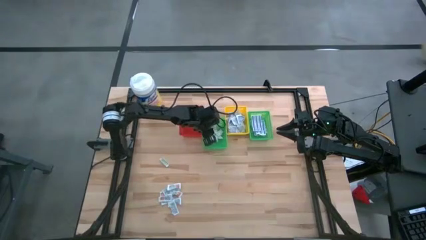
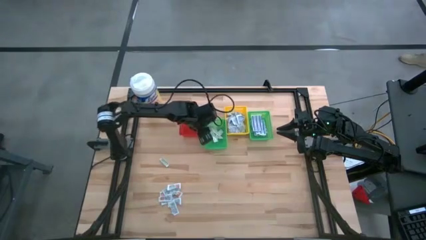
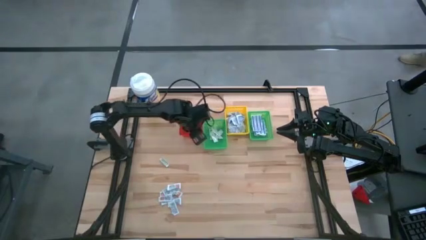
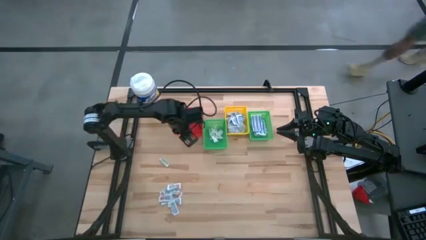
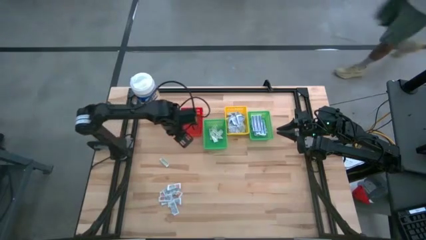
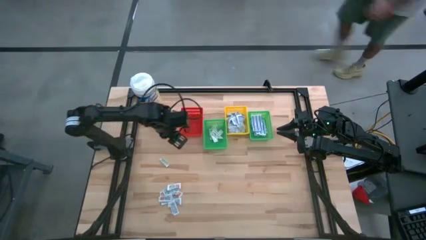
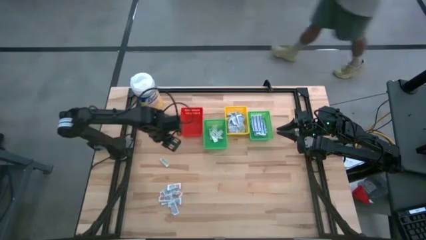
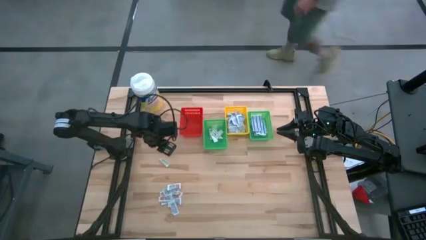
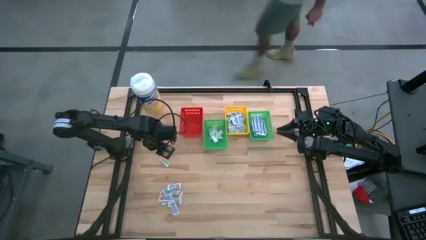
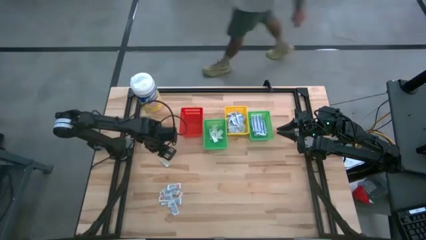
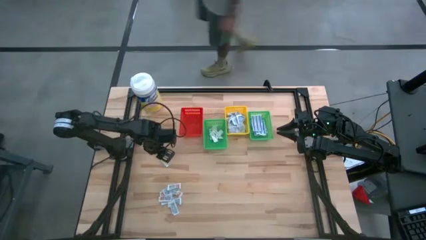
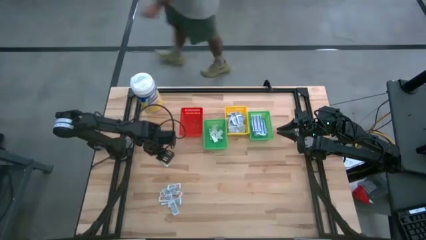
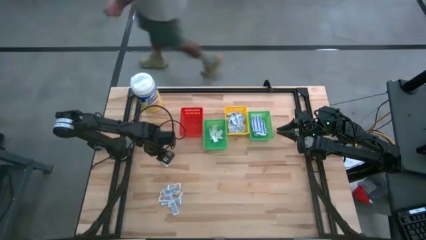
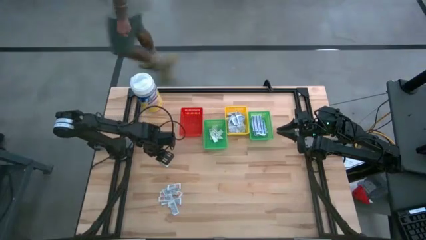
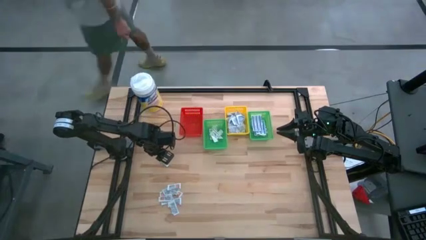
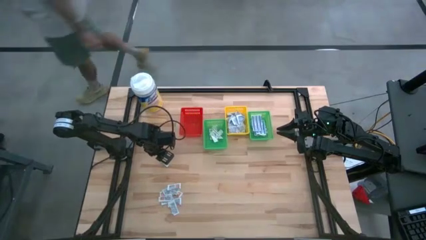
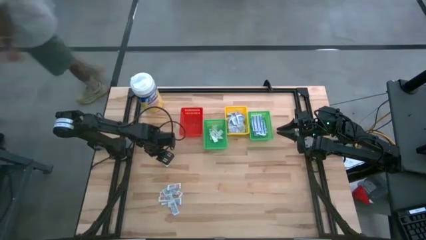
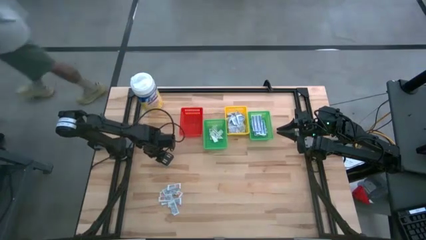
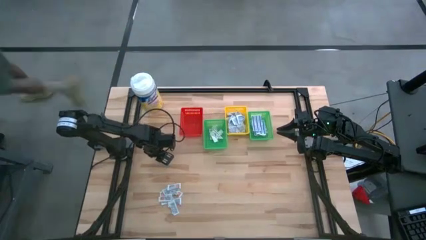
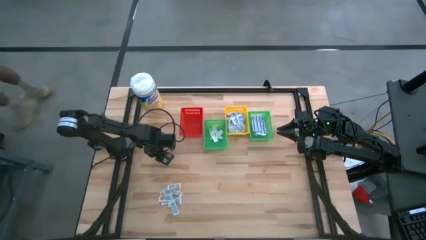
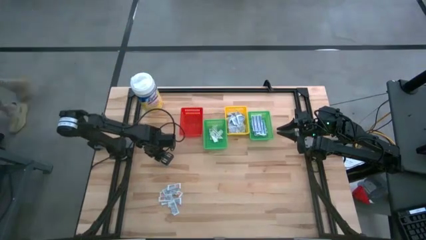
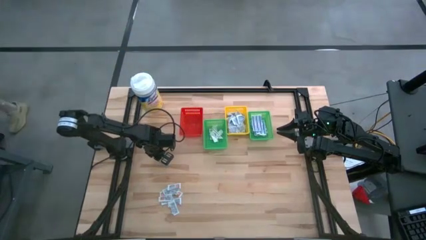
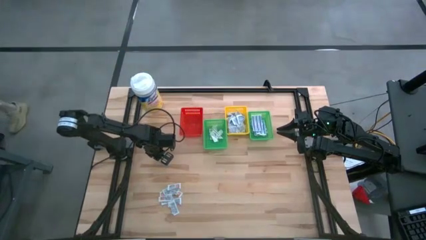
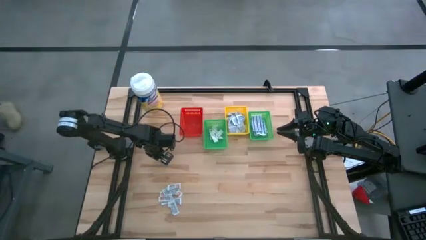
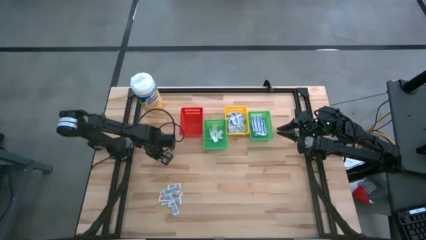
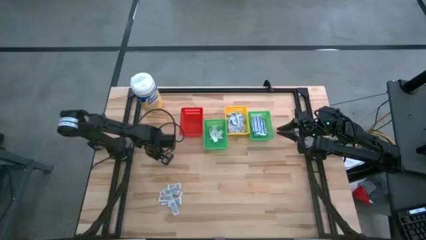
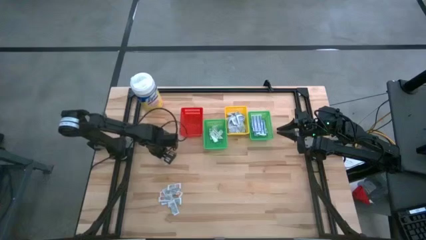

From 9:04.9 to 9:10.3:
Task: Pick & Place First Aid Supplies
Put the bandage into the left green basket

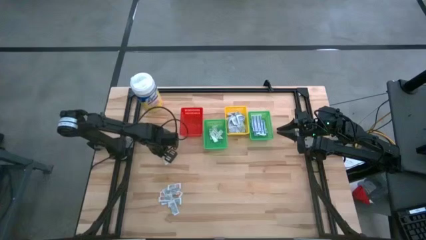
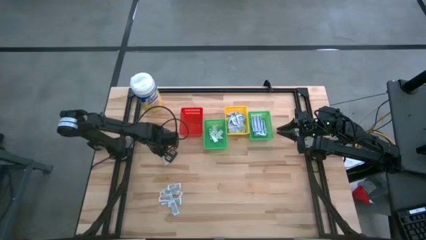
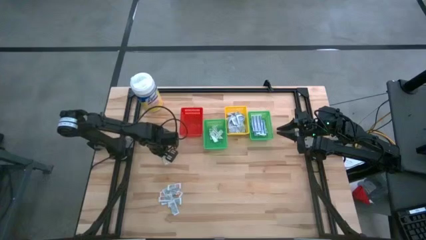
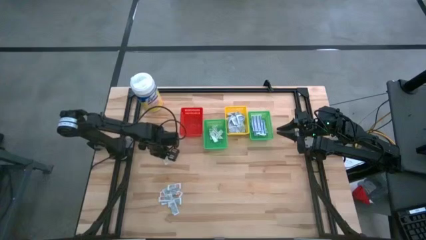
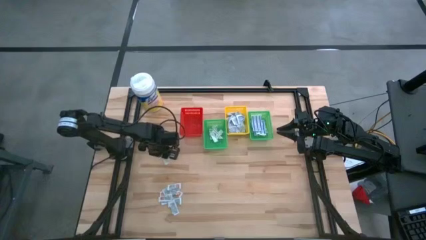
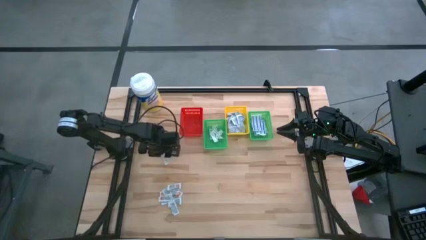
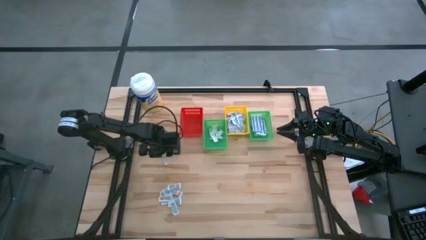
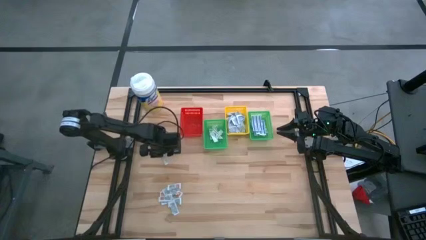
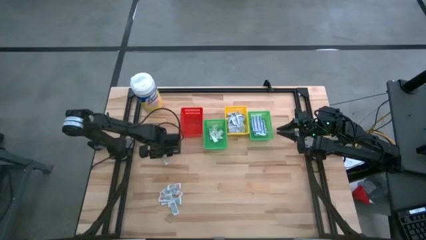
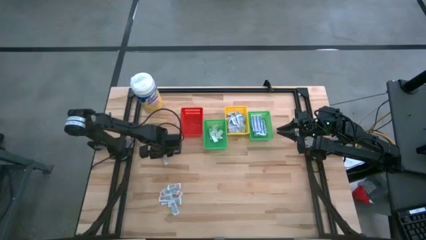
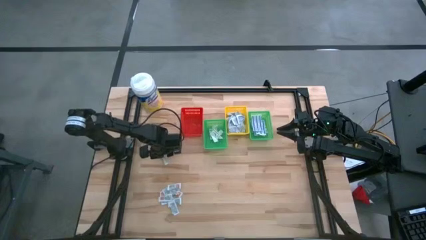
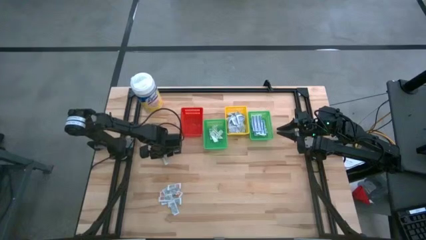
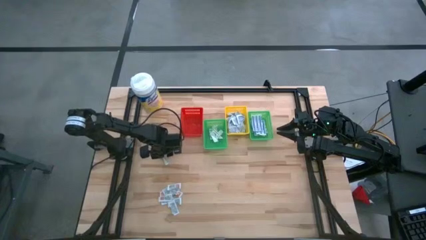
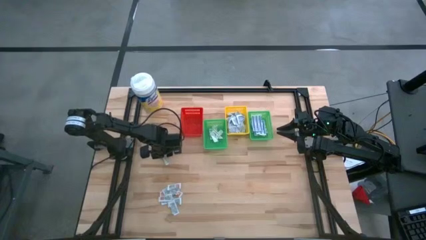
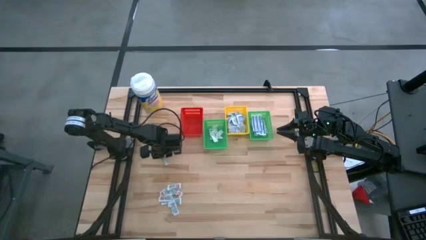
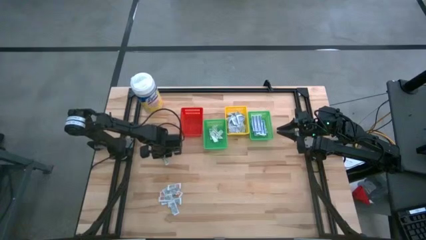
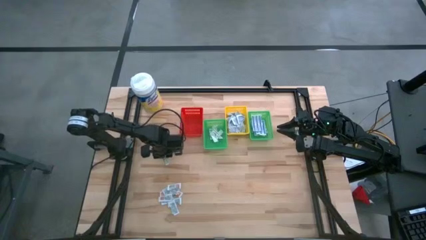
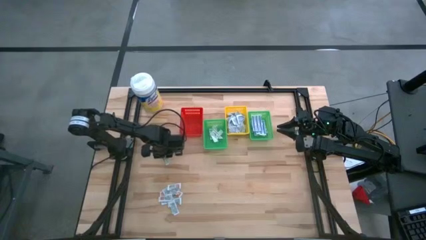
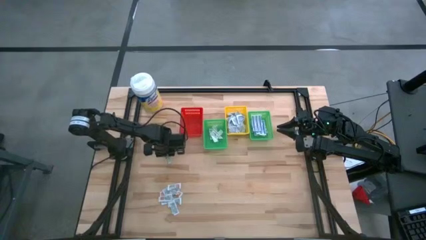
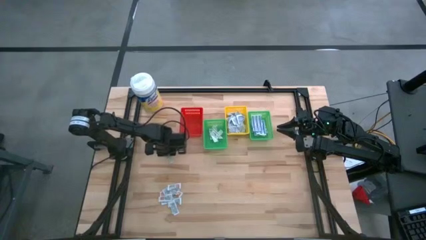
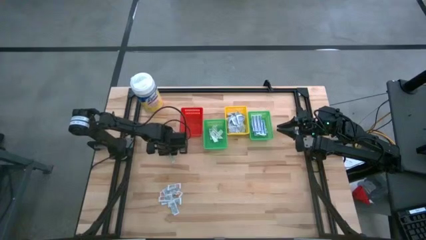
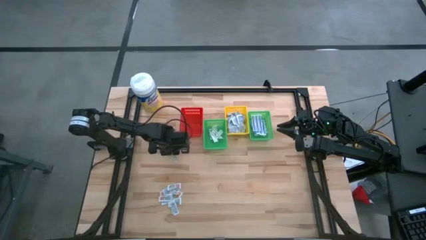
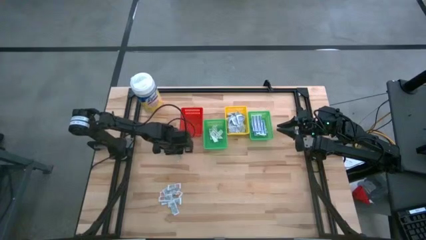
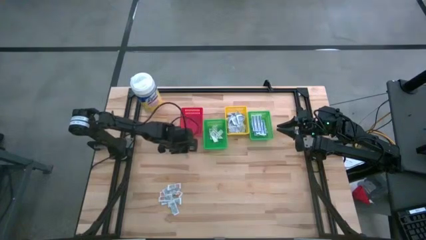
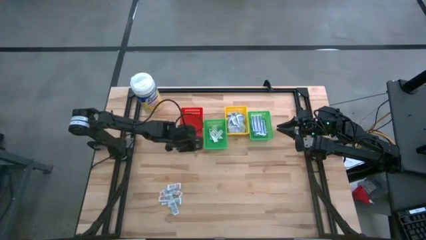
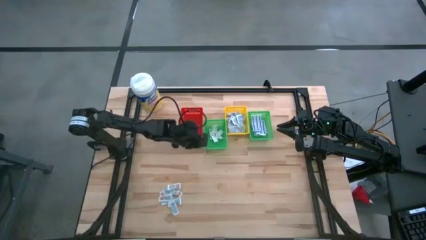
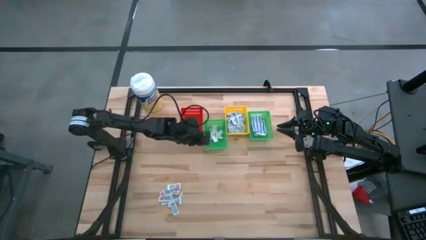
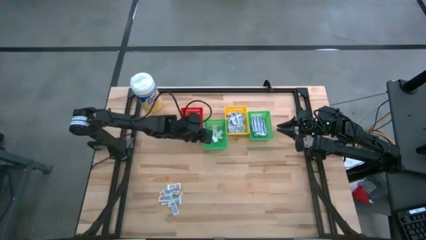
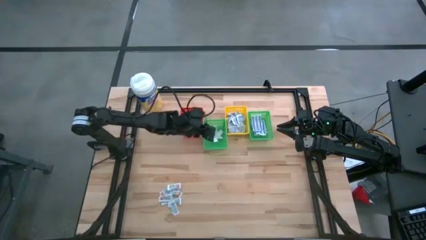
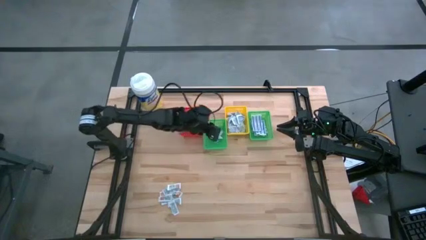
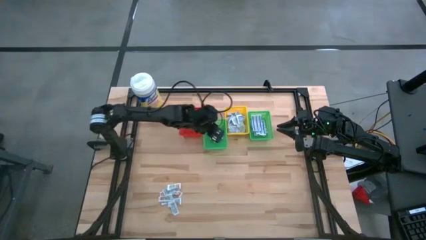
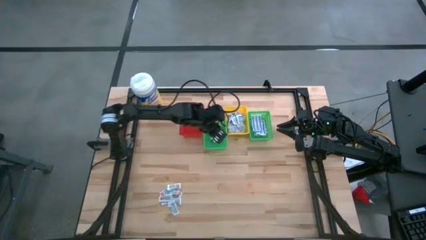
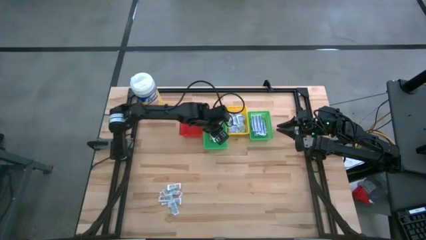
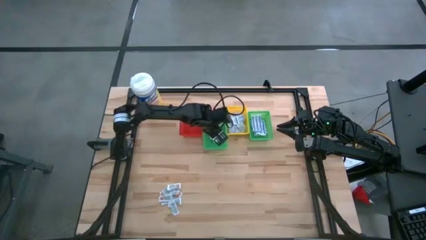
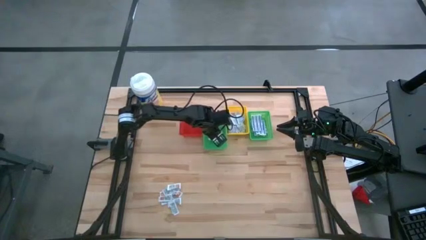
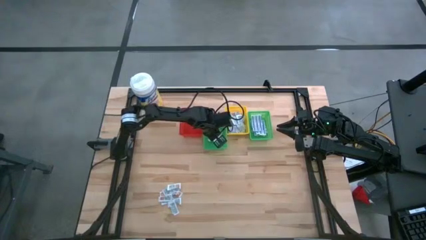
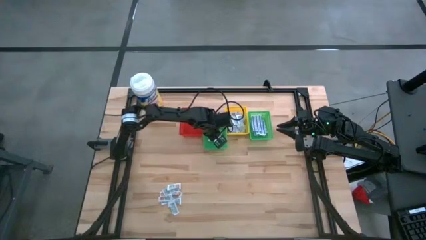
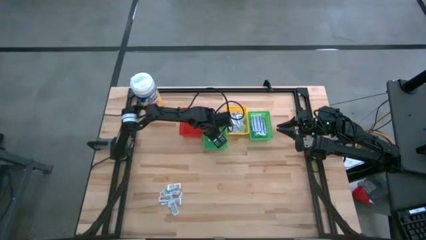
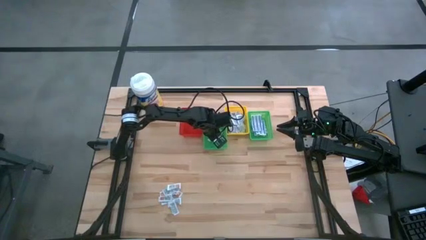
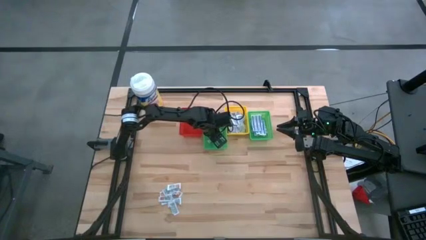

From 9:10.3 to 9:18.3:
Put the bandage into the left green basket

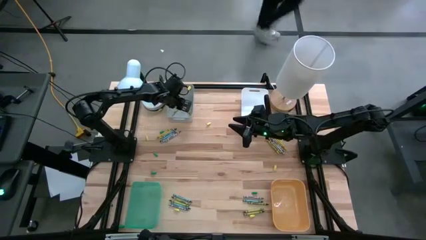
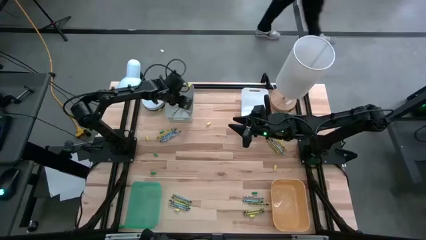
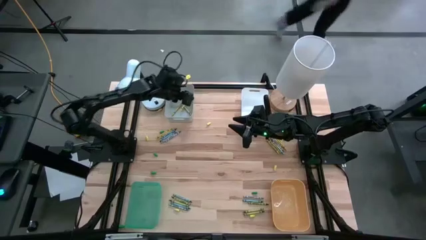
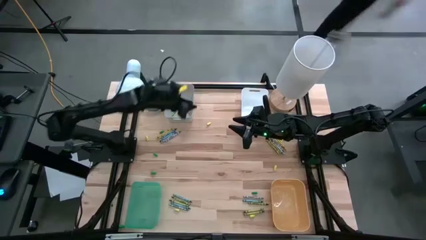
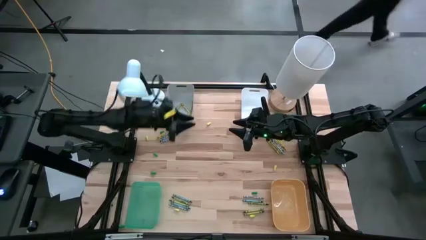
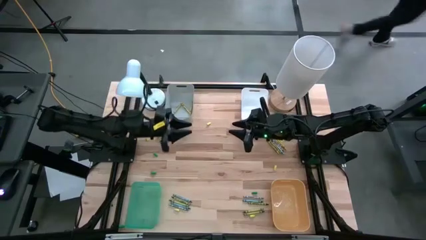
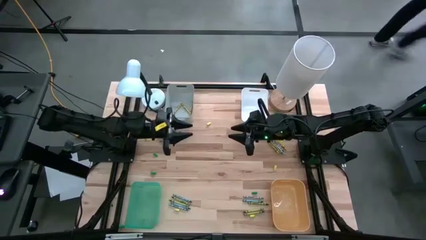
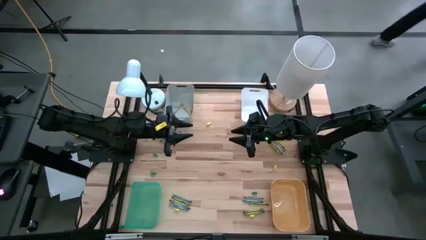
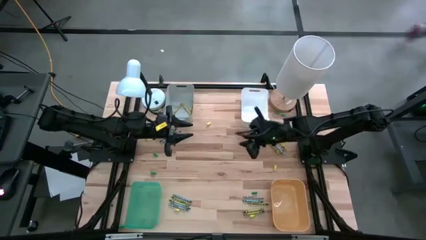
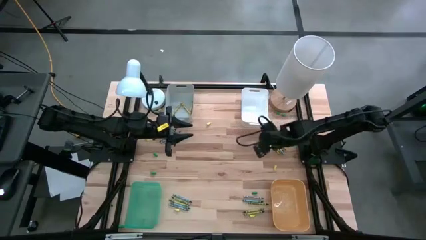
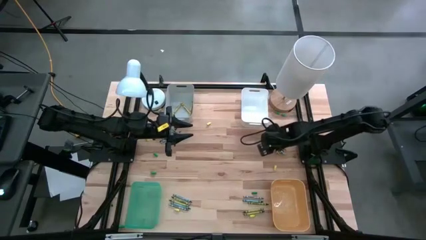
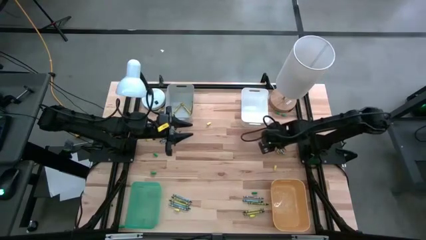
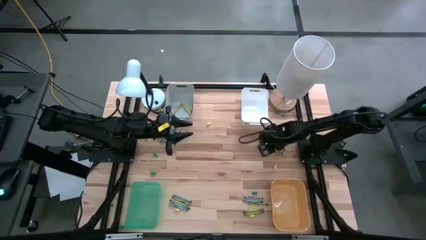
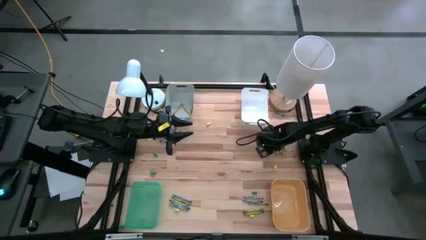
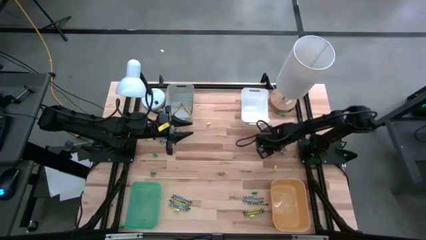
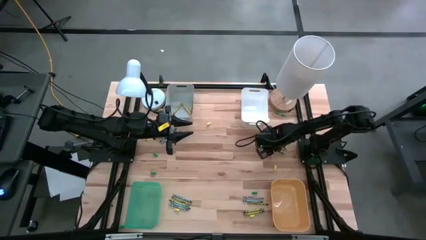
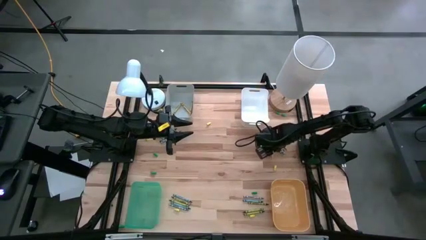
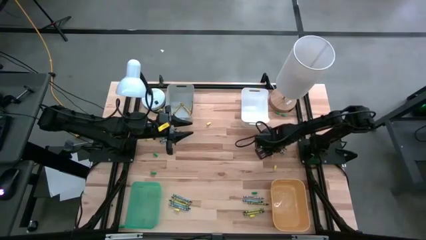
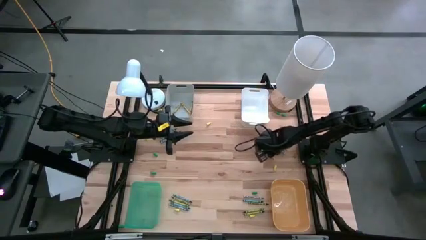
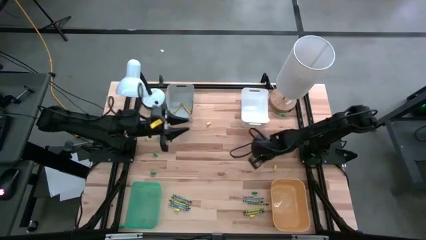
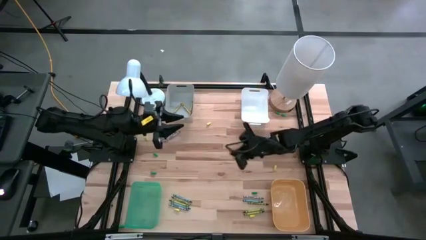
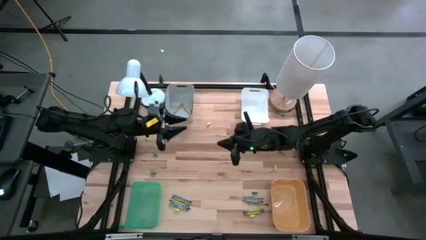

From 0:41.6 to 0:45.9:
Task: Sort crayons
Put the yellow crayon into the gray bin
